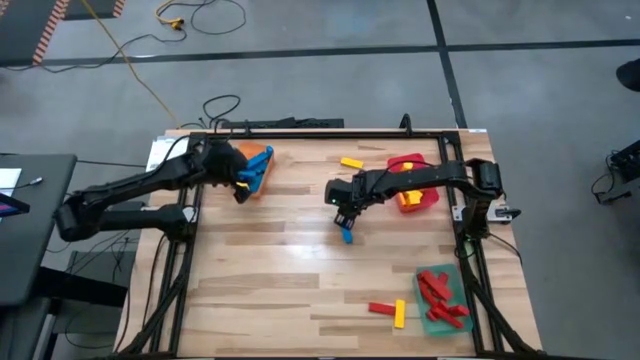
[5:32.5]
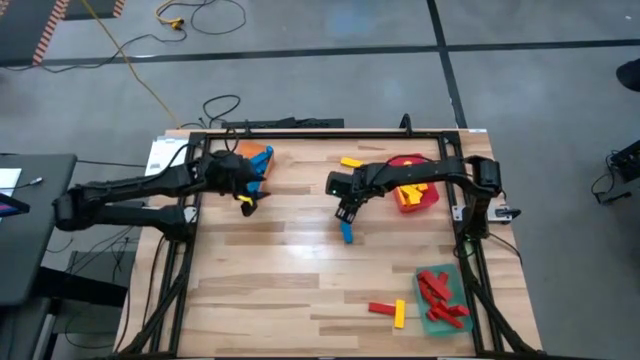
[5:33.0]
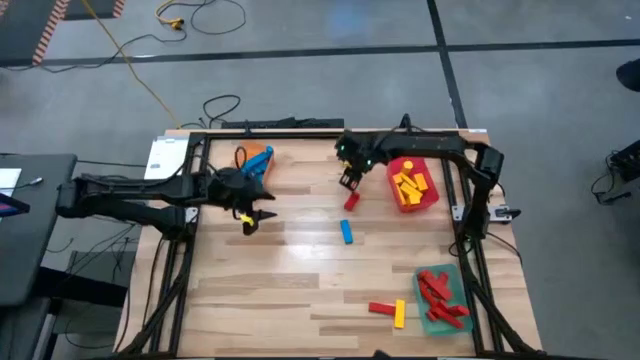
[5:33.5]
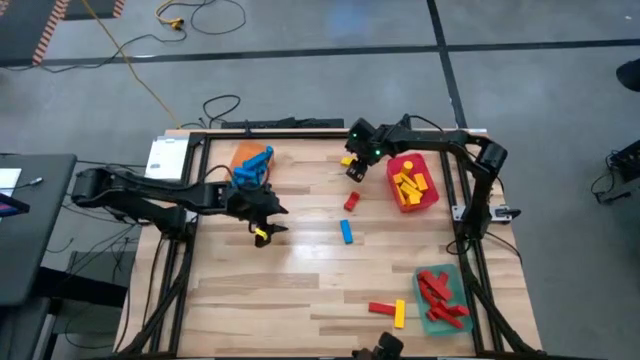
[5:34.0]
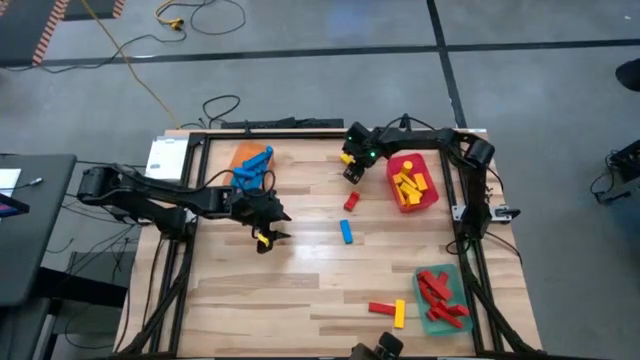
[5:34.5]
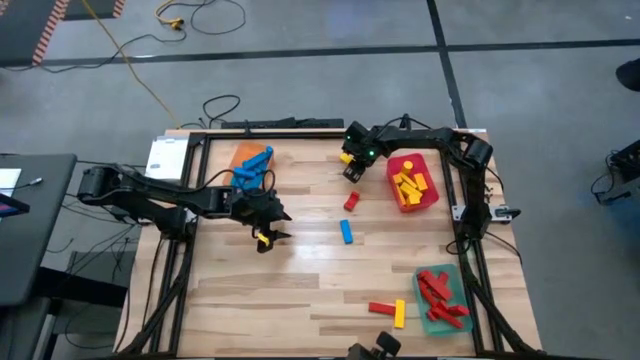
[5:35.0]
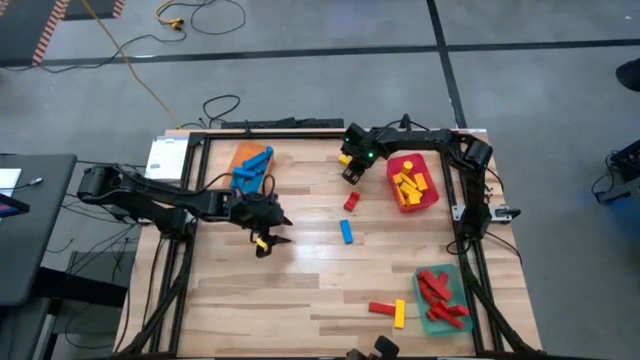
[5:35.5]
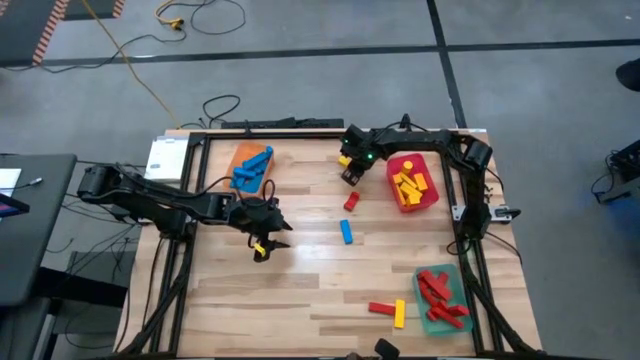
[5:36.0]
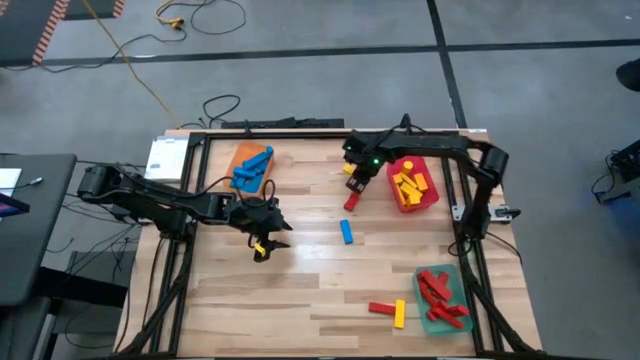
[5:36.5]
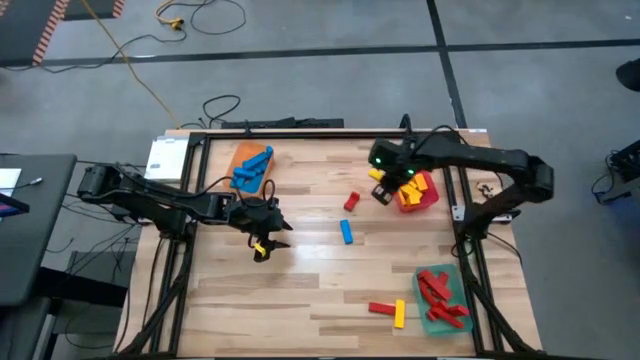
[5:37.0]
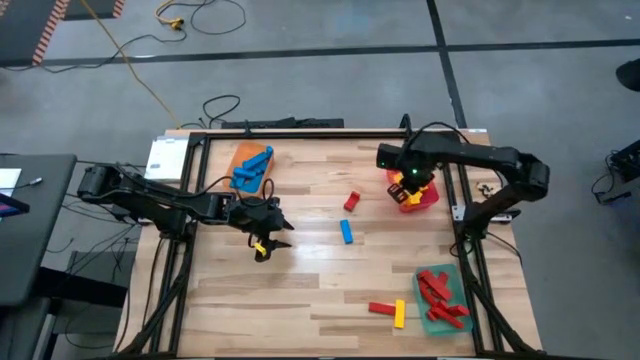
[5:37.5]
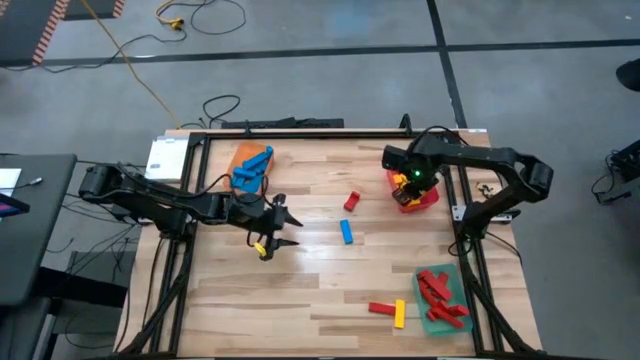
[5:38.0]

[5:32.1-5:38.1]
Task: Sort blocks
Put the yellow rectangle block into the red bin

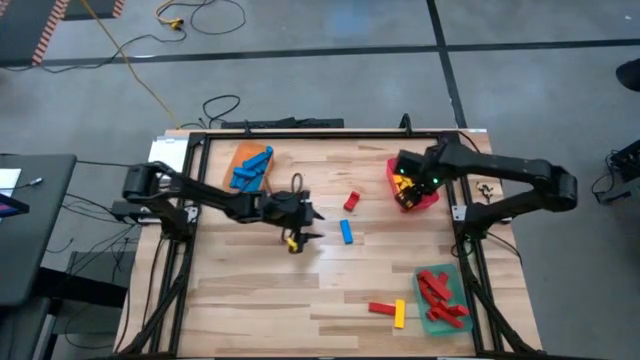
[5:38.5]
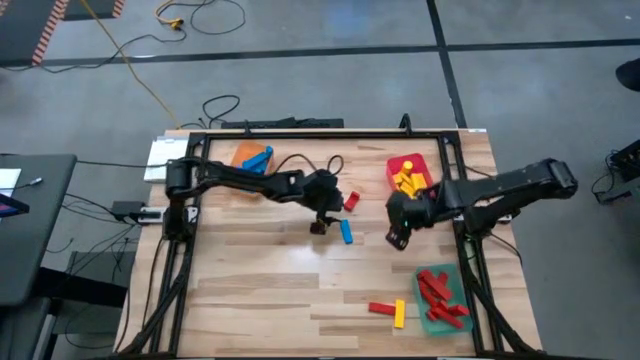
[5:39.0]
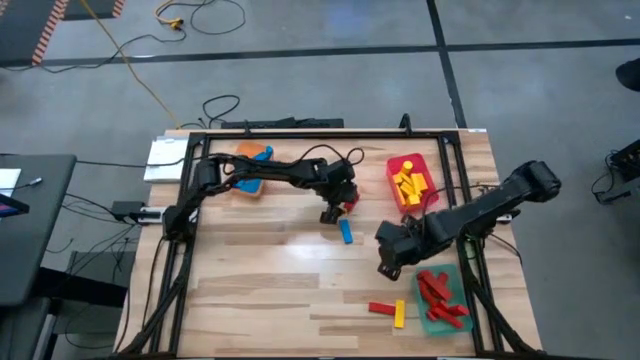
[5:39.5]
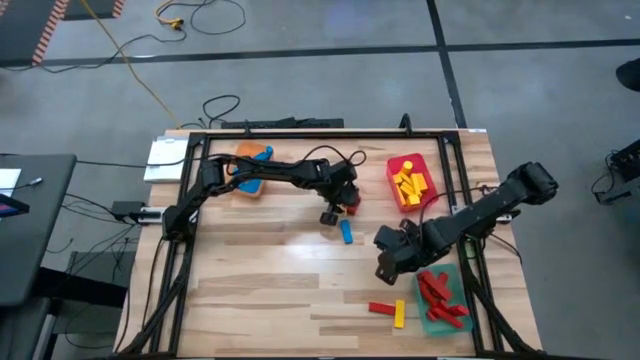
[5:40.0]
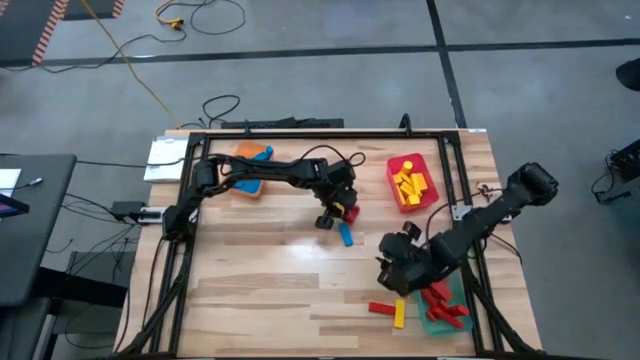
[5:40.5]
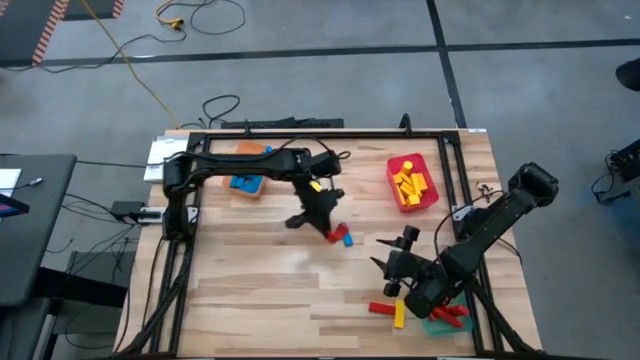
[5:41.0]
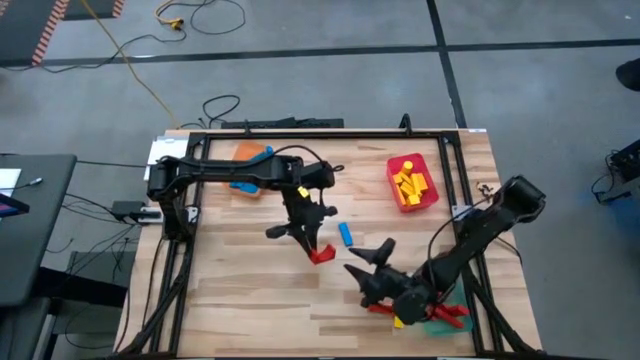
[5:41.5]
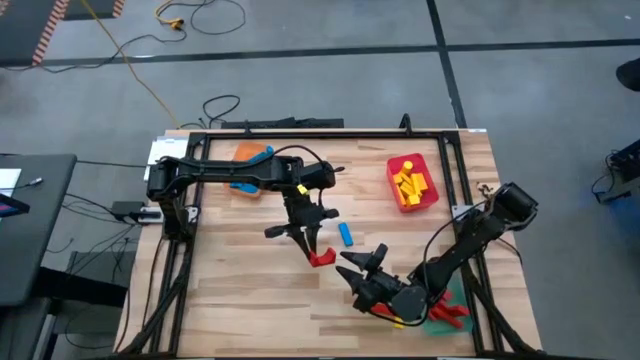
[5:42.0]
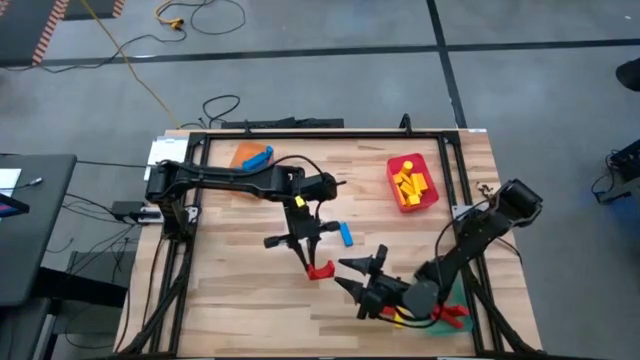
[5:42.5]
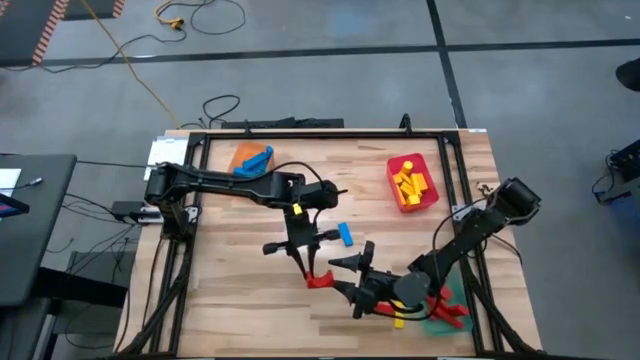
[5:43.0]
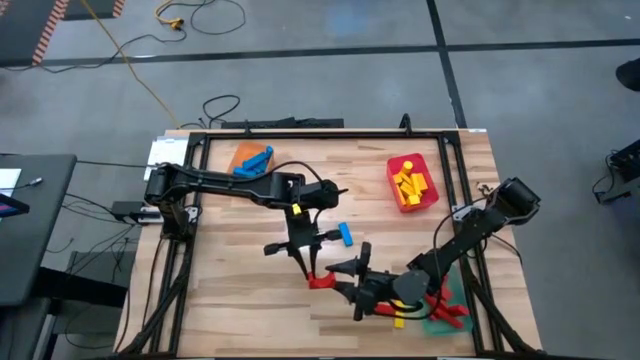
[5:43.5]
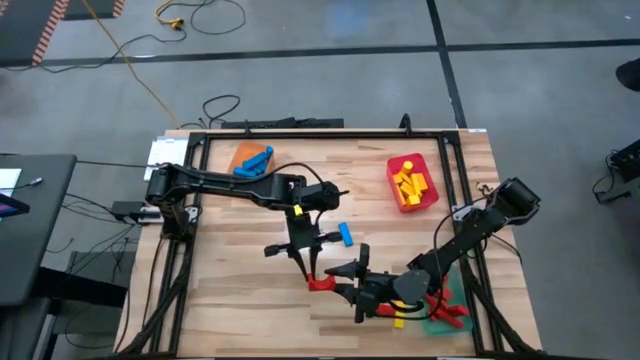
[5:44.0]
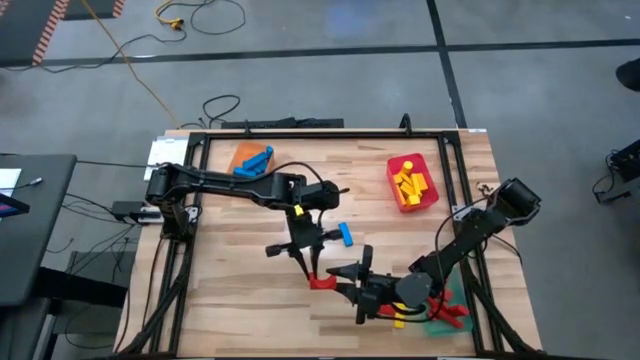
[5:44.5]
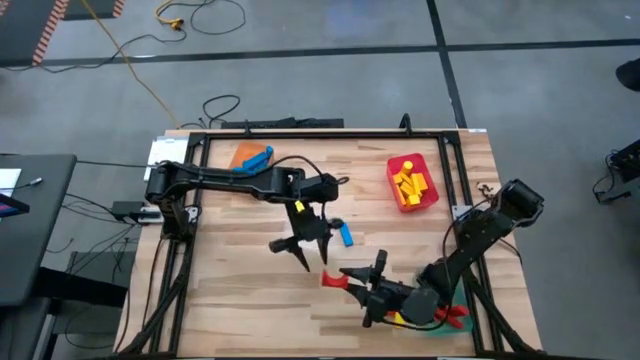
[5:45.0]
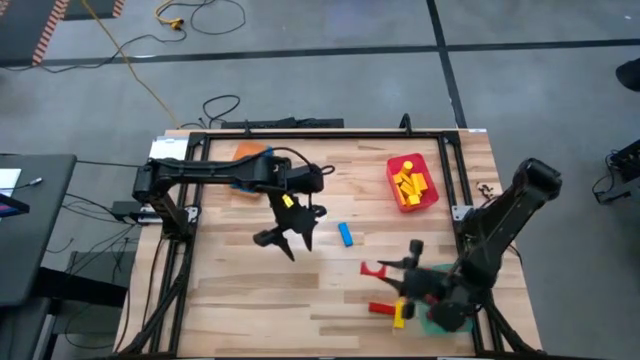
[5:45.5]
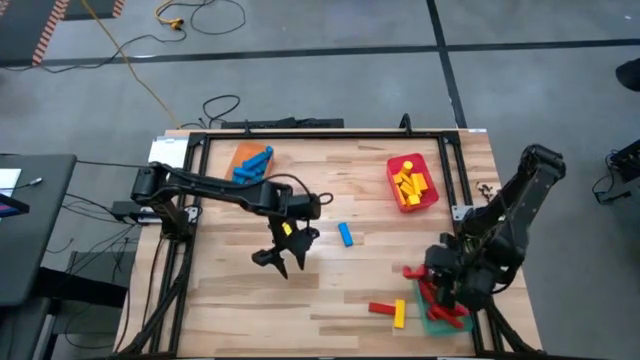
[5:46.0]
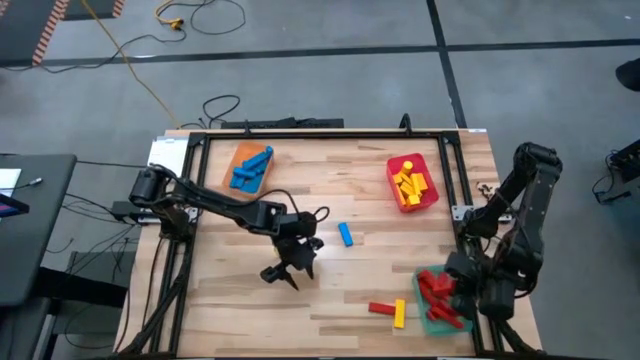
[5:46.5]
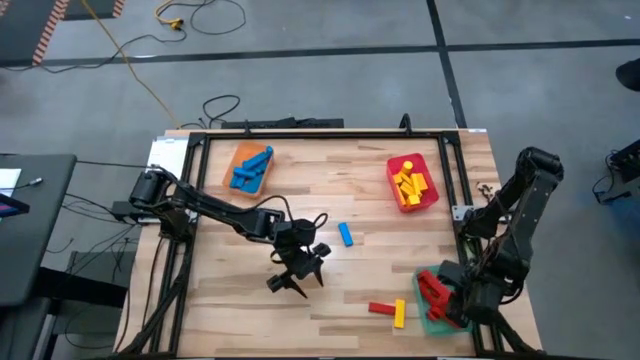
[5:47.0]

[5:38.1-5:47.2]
Put the red arch block into the green bin

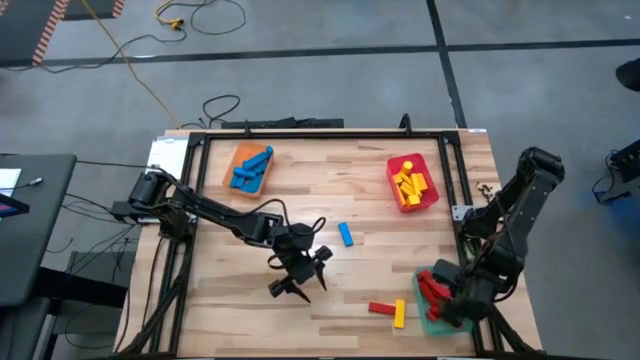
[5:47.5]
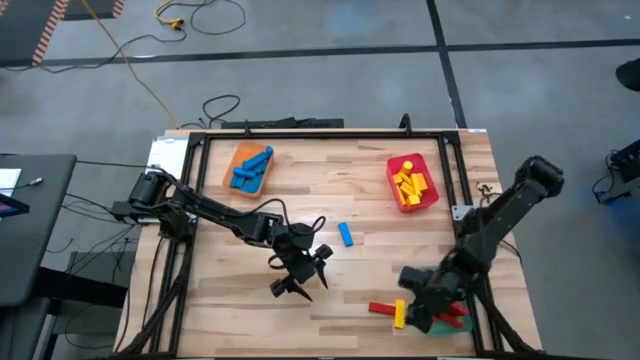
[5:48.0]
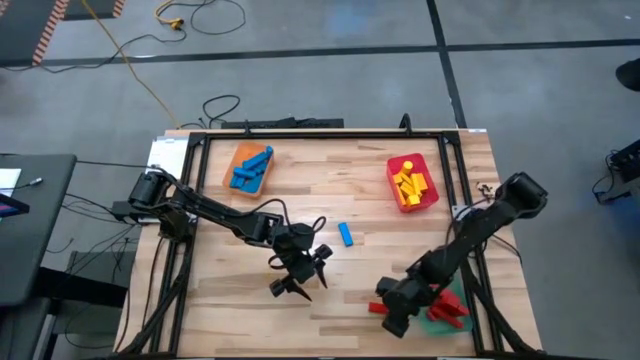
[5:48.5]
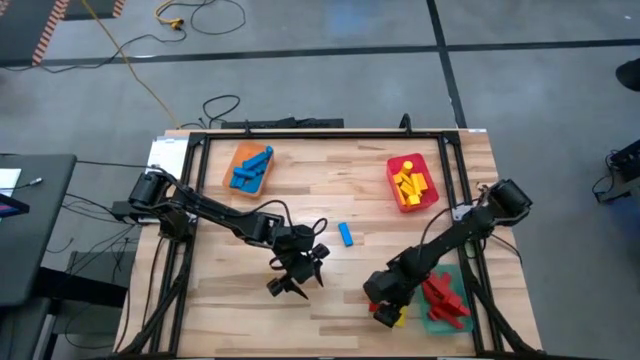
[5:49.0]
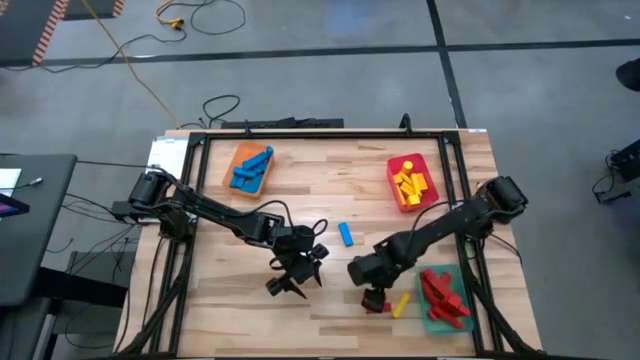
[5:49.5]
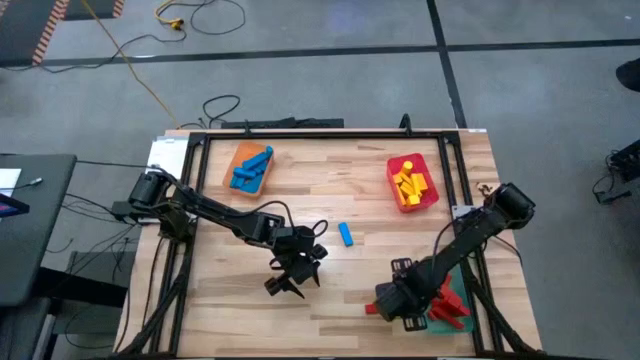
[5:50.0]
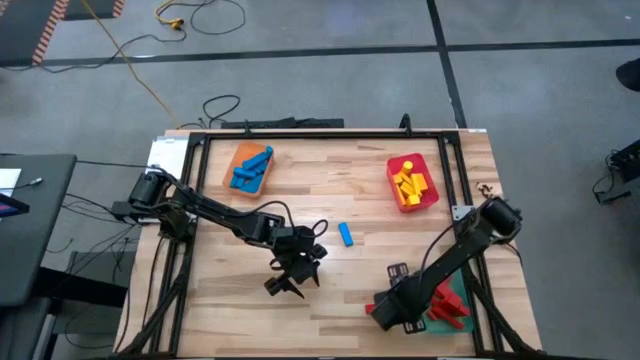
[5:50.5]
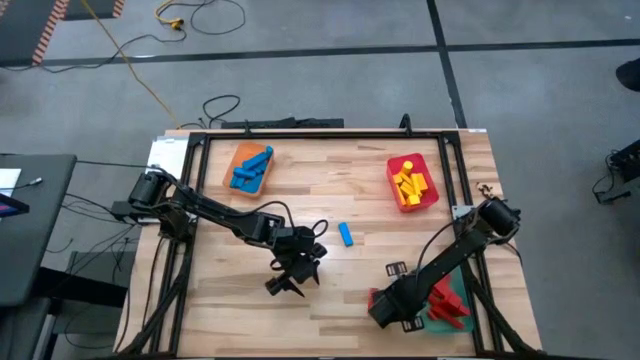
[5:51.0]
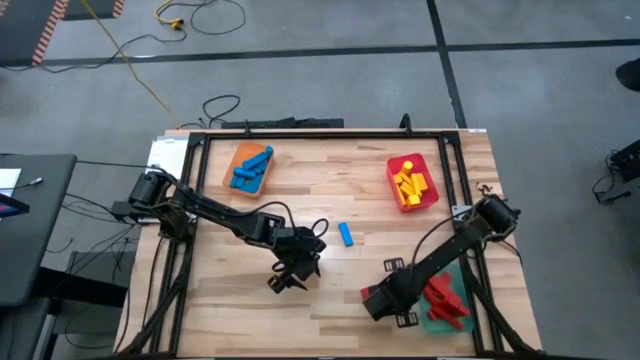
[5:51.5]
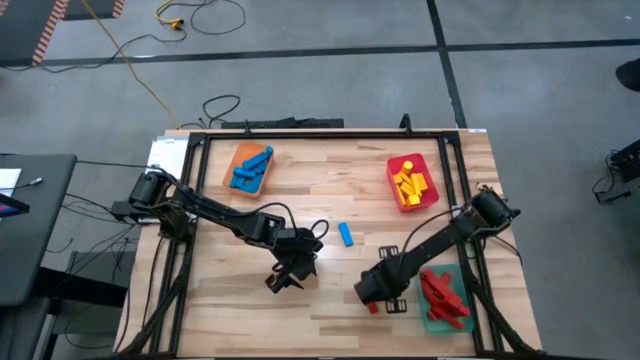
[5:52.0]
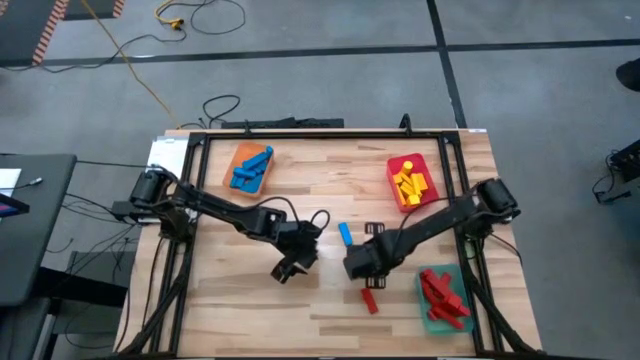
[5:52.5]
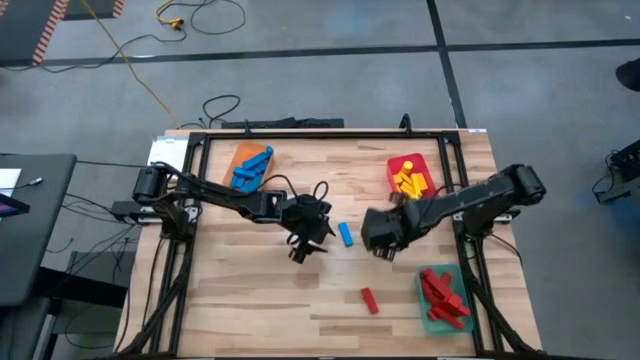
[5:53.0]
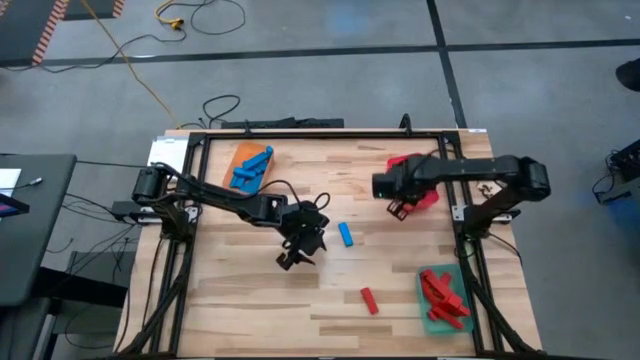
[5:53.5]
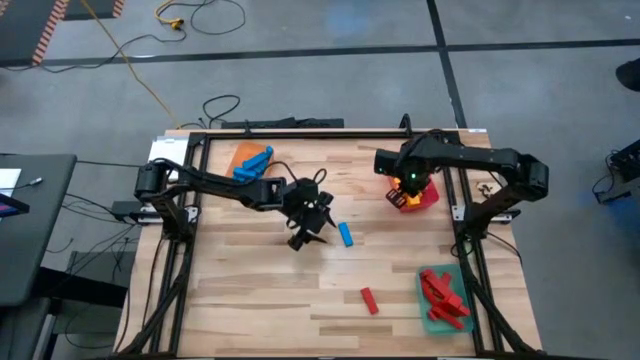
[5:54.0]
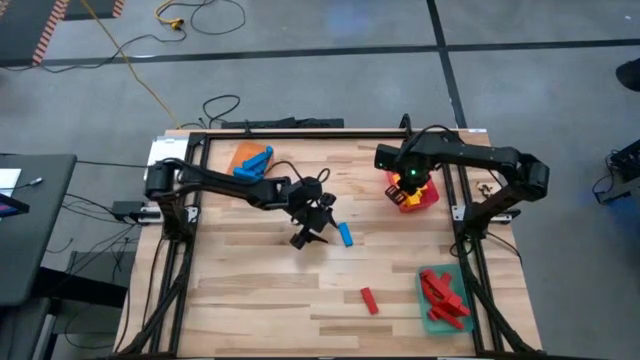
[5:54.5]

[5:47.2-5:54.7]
Put the yellow rectangle block into the red bin
